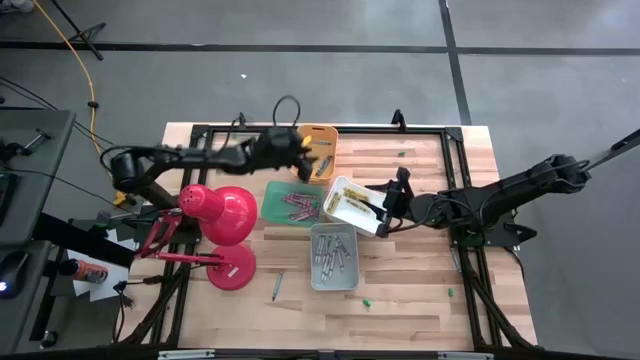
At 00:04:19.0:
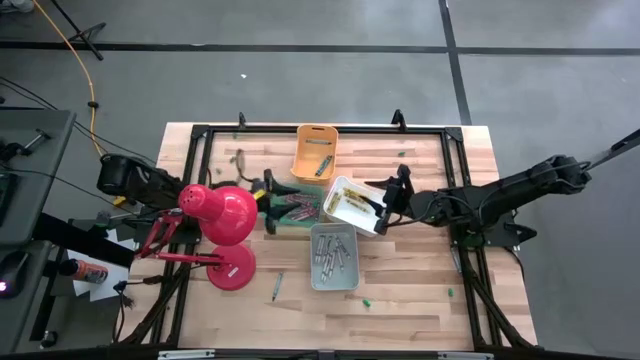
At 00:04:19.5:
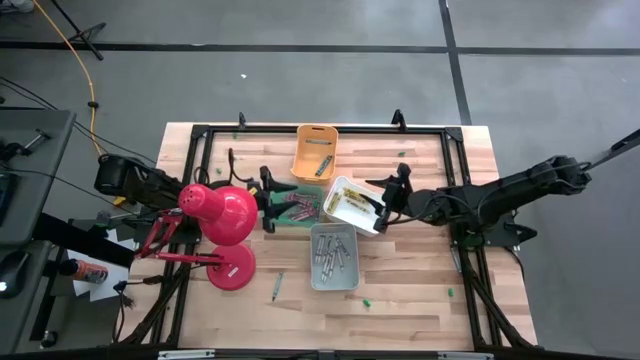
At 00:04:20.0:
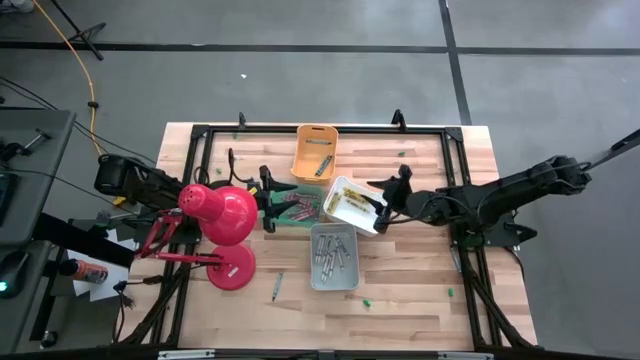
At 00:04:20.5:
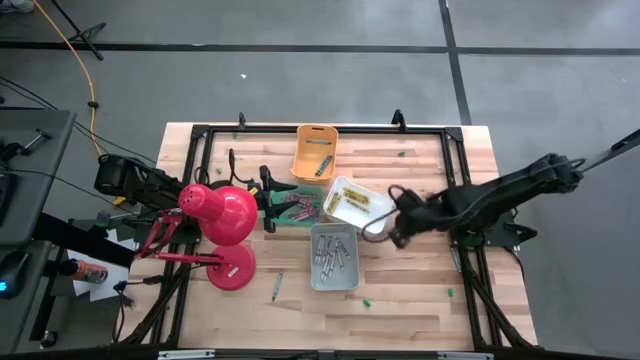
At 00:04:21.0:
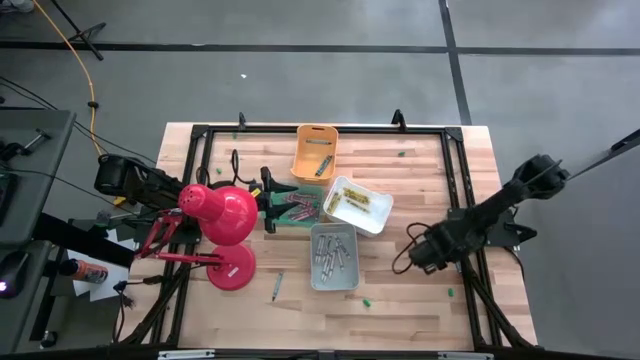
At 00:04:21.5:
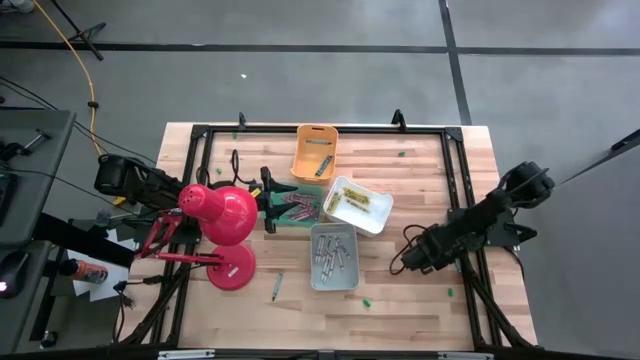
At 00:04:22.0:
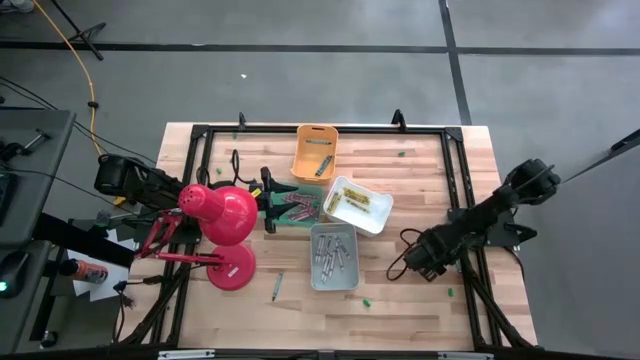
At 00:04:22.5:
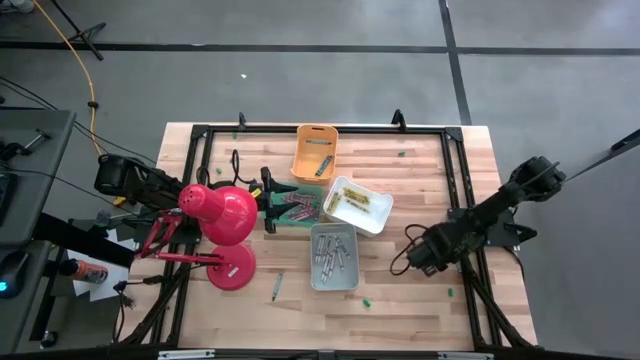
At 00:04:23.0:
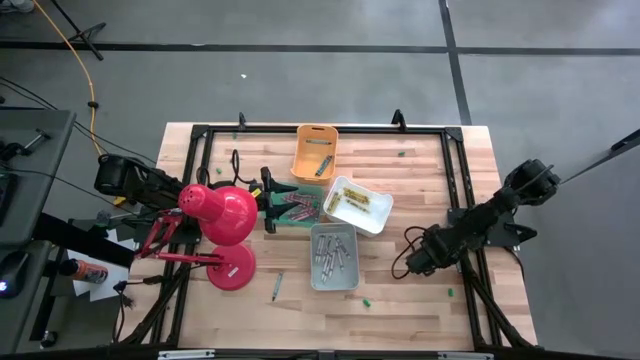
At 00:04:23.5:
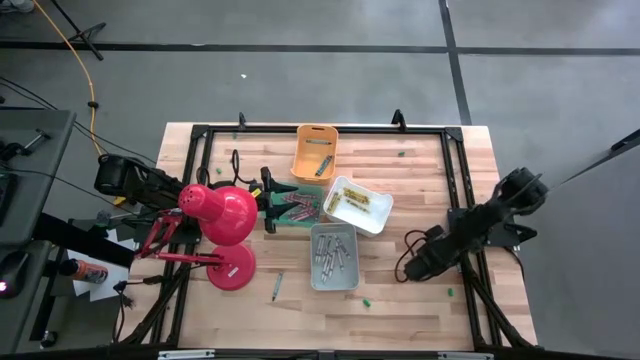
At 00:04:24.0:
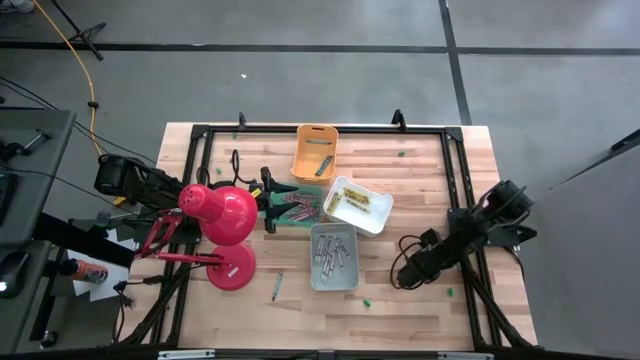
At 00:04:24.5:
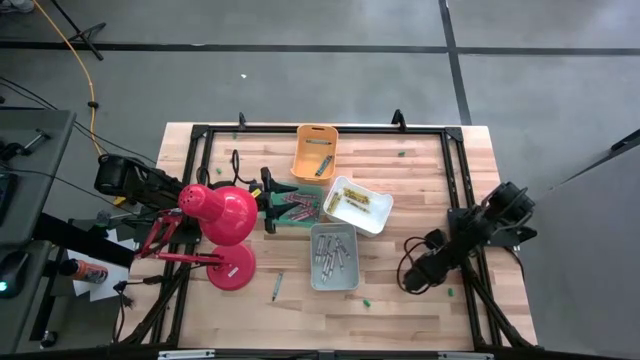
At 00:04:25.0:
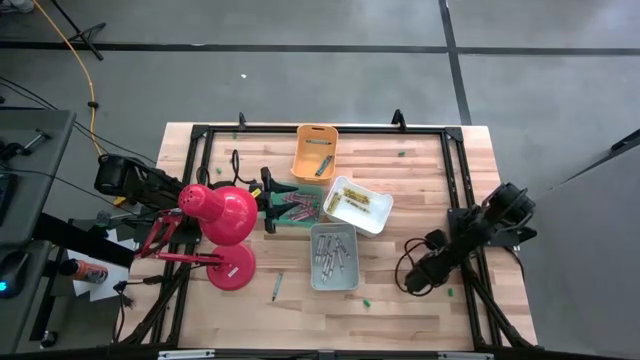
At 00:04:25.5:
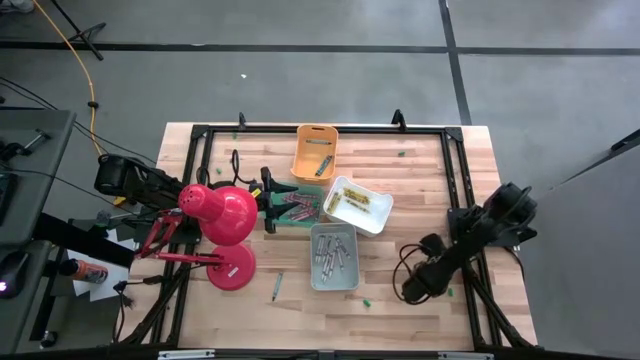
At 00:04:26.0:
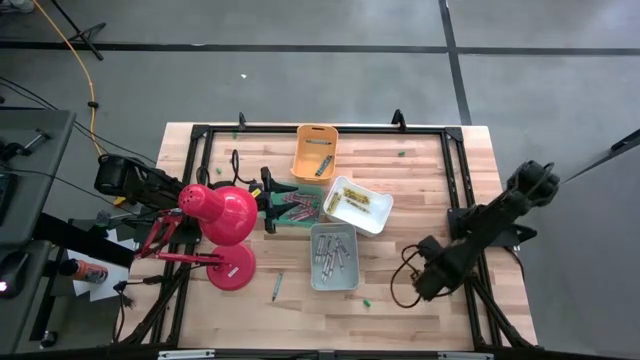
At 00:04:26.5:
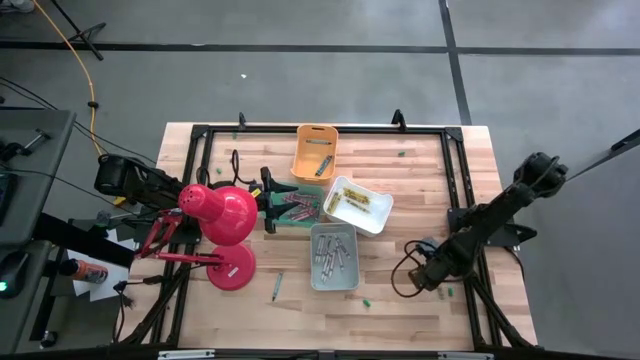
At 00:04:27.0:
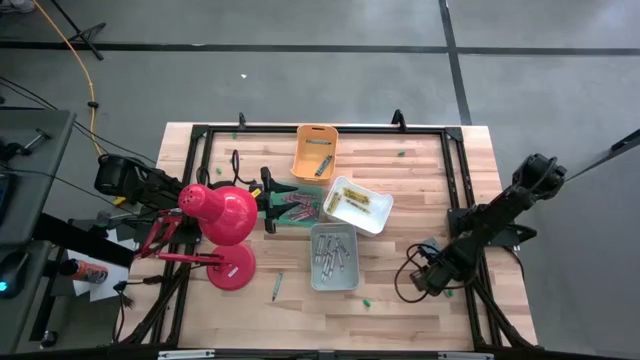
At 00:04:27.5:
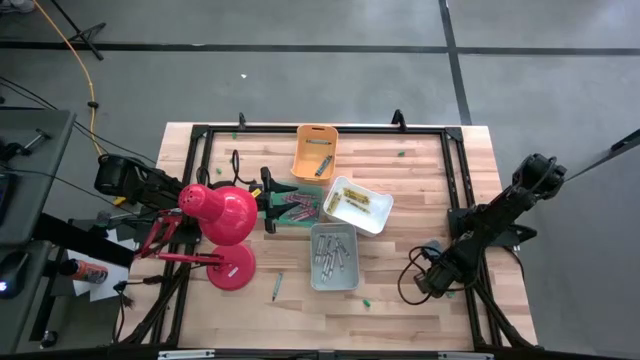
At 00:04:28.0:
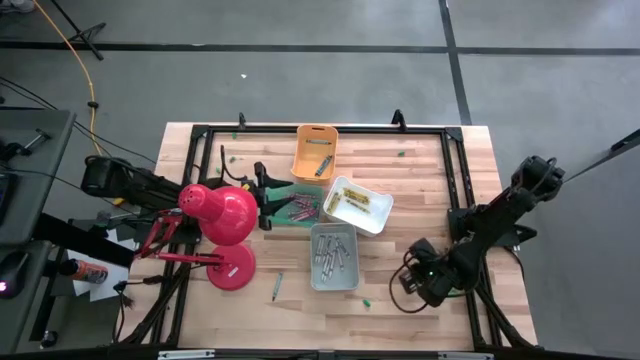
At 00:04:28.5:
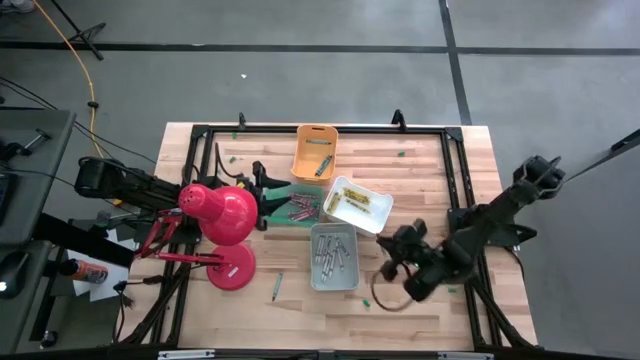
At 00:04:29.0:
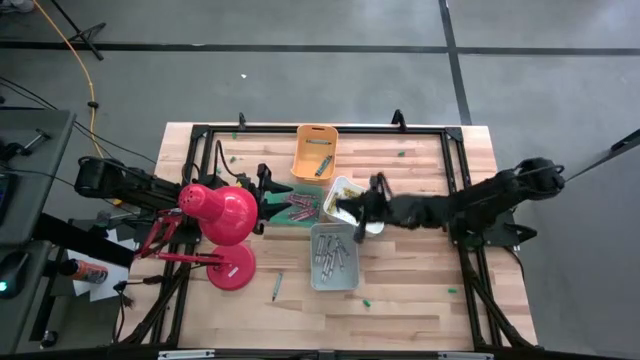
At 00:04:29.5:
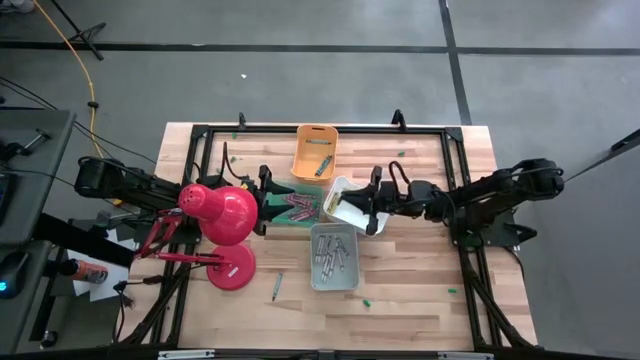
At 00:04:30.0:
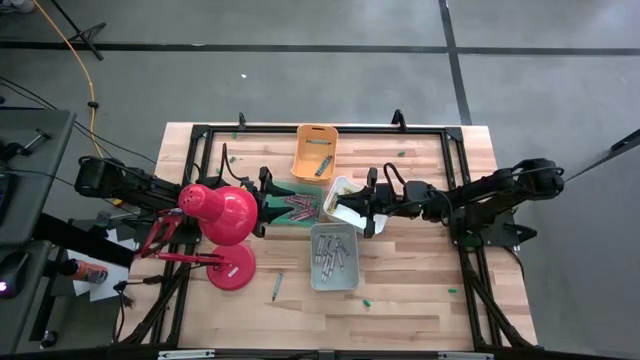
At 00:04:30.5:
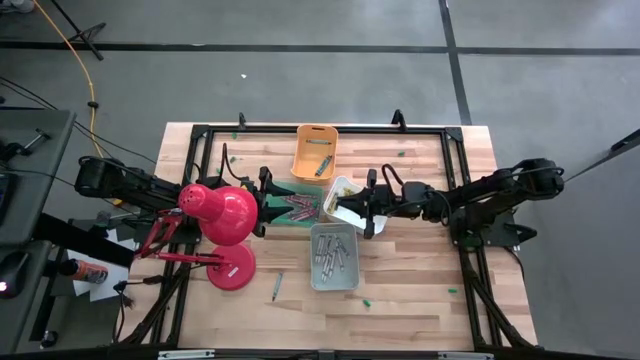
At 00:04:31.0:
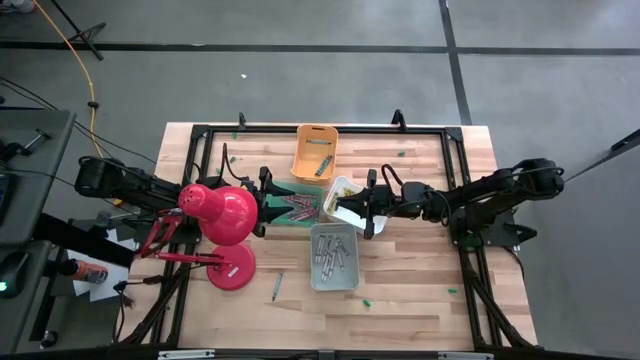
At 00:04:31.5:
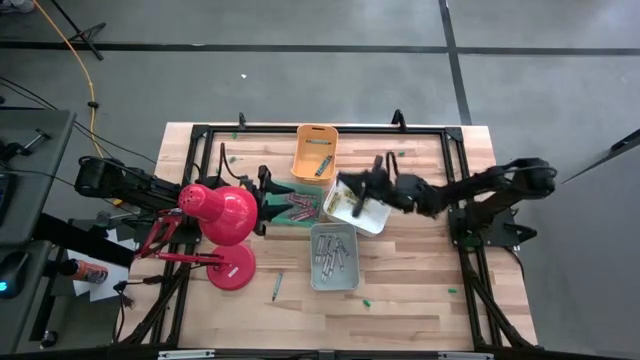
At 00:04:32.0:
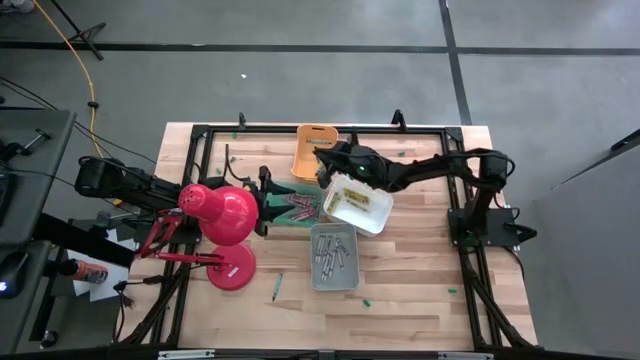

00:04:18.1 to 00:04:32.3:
Task: Sort crayons
Put the blue crayon into the yellow bin

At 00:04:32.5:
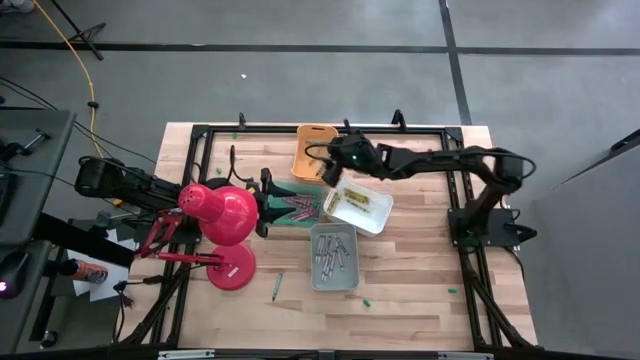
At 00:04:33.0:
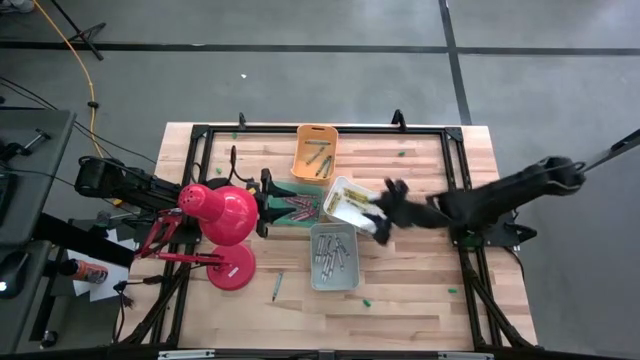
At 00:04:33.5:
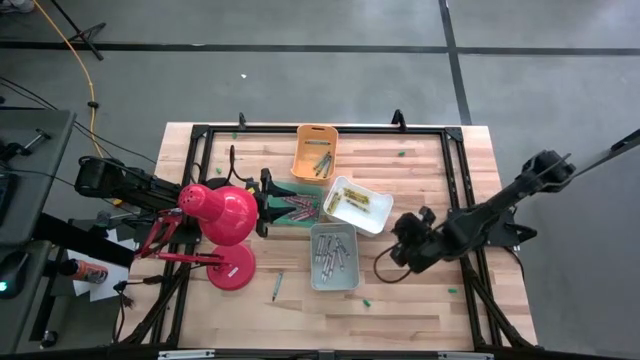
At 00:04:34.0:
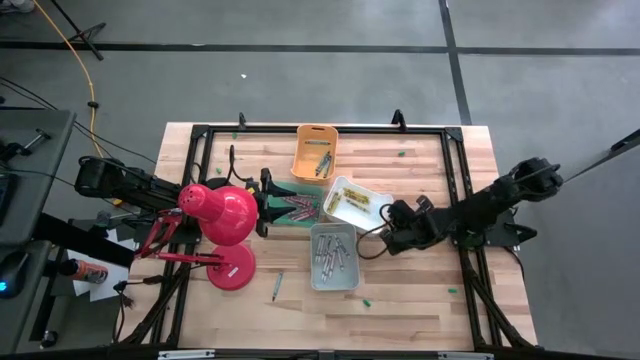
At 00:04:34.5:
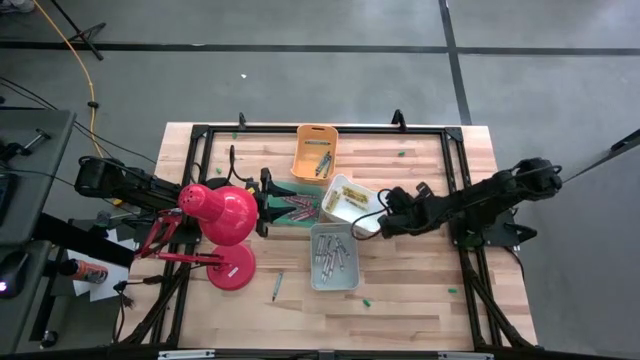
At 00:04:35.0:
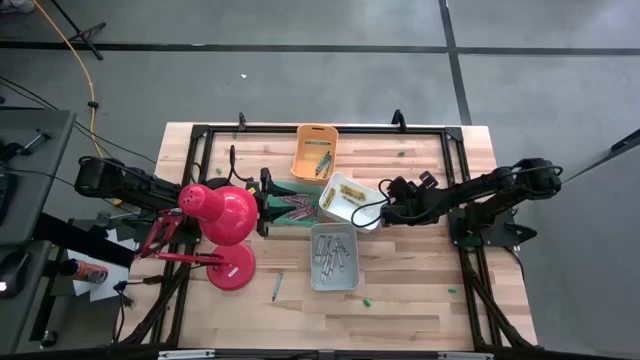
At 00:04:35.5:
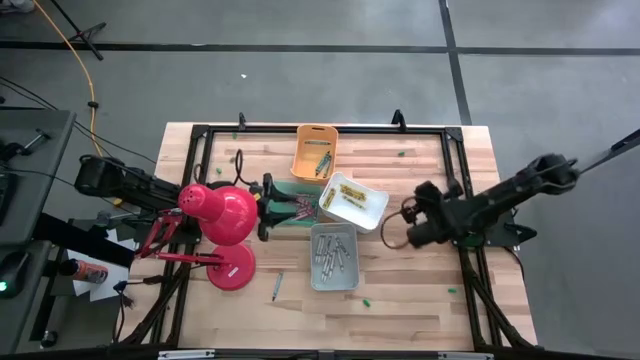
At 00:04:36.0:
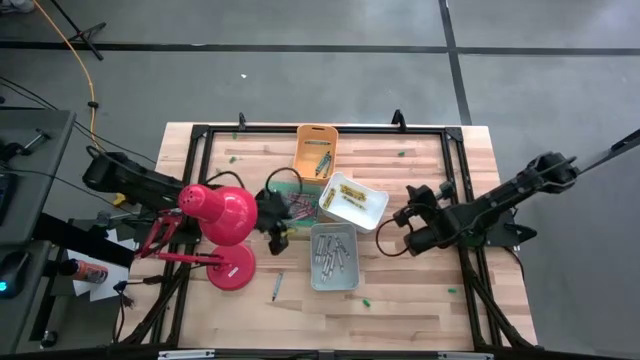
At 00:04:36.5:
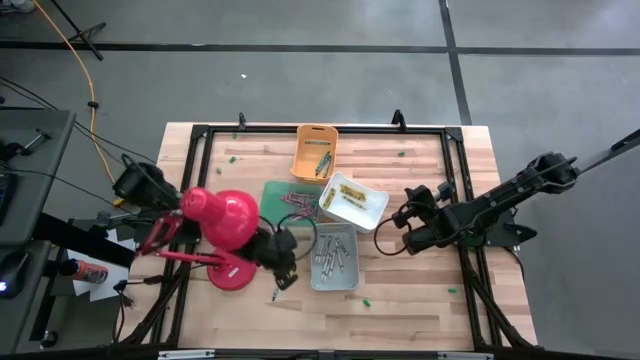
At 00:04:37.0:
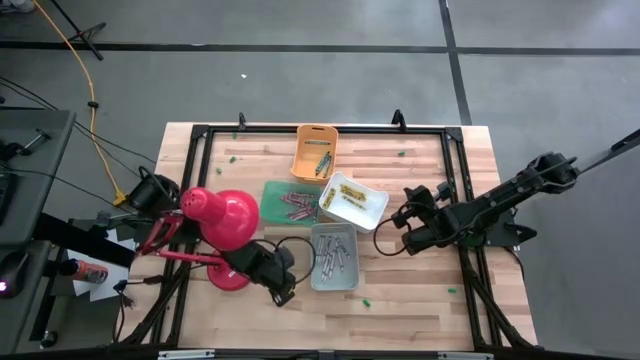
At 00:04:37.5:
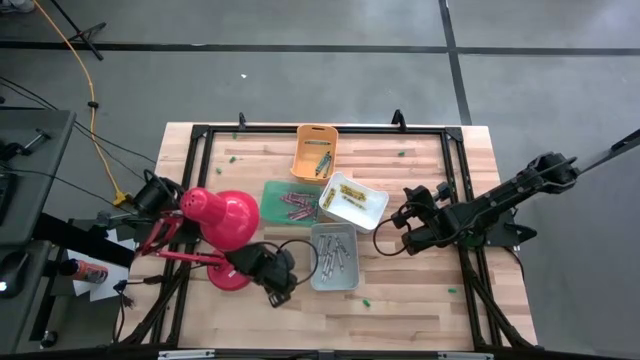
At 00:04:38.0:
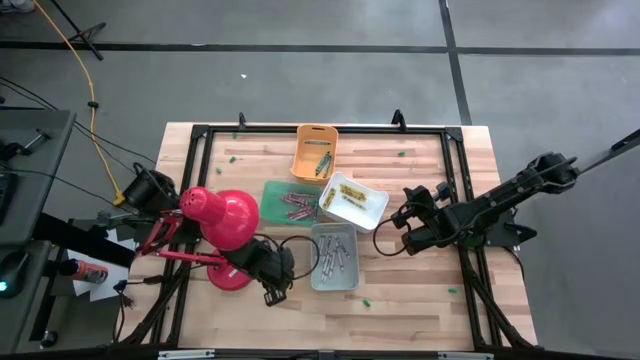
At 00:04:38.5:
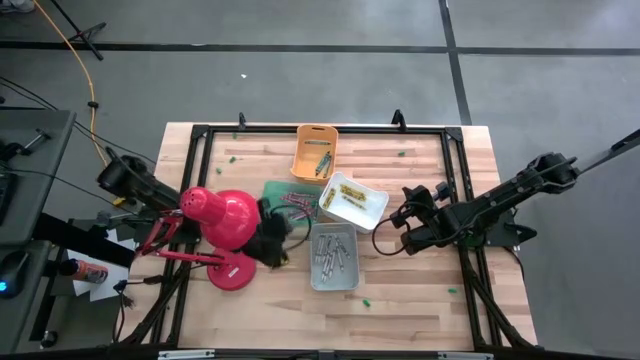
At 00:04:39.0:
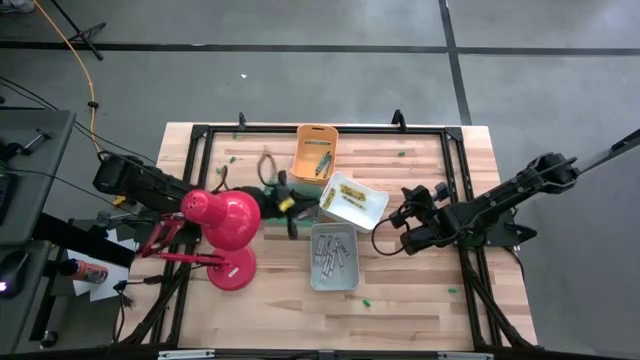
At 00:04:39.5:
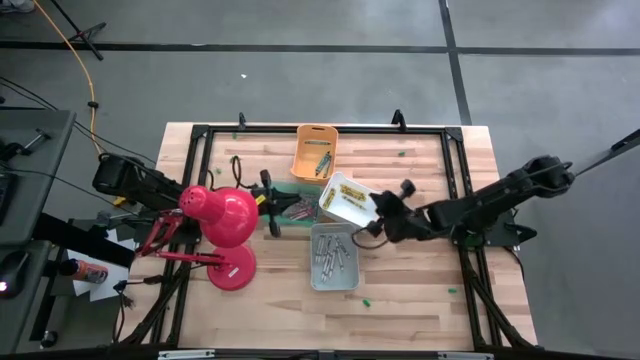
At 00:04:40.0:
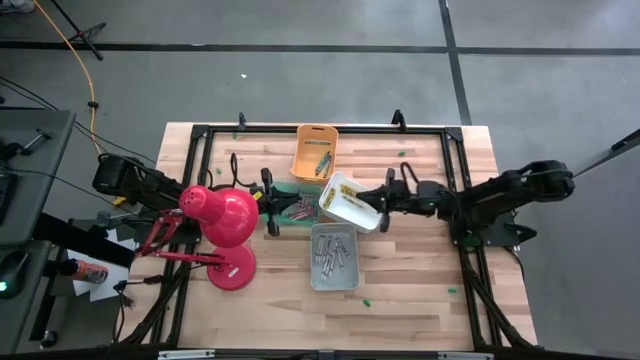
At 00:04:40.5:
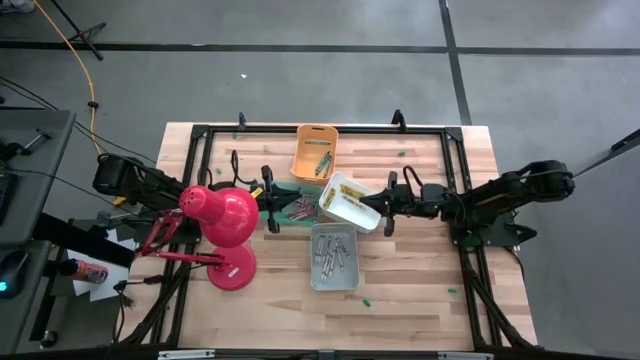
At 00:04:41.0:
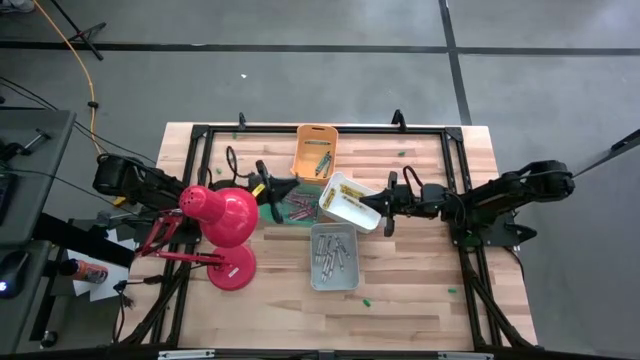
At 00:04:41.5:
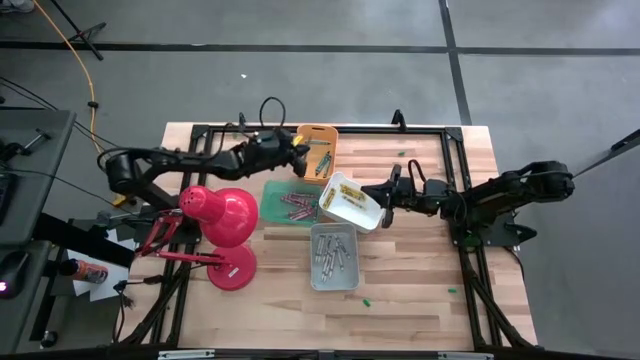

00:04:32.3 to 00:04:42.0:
Put the blue crayon into the yellow bin
